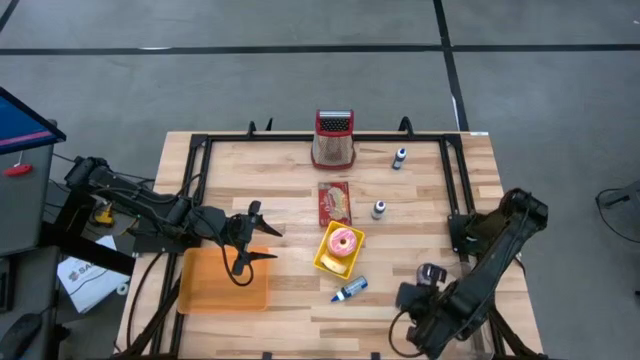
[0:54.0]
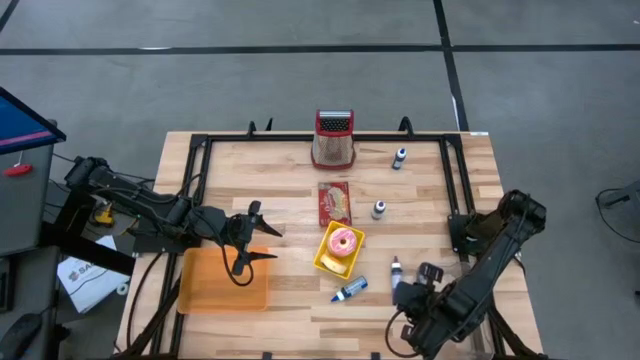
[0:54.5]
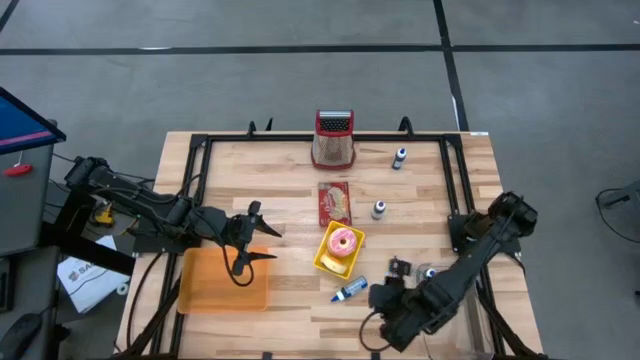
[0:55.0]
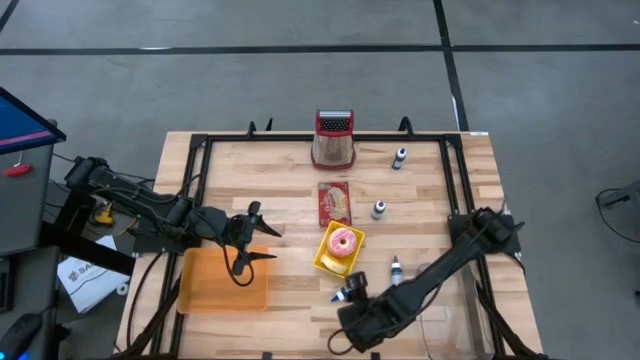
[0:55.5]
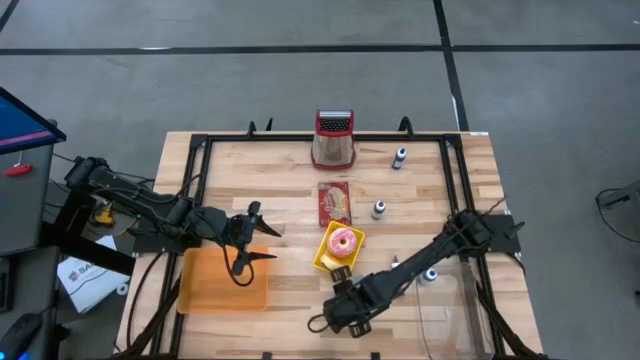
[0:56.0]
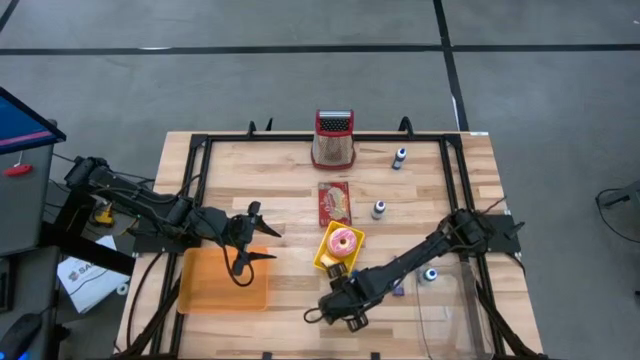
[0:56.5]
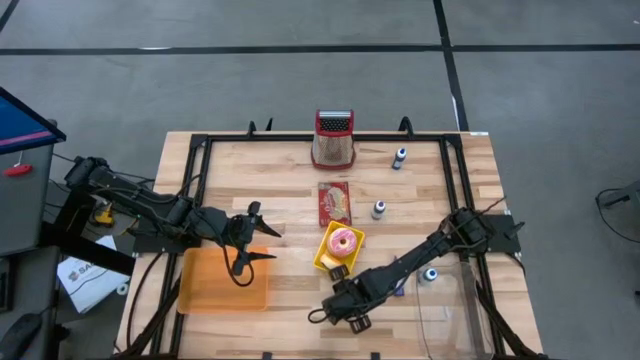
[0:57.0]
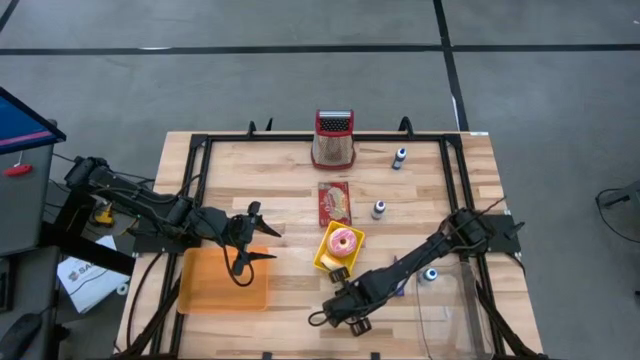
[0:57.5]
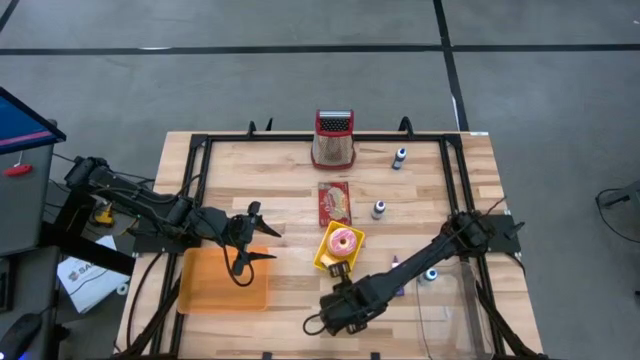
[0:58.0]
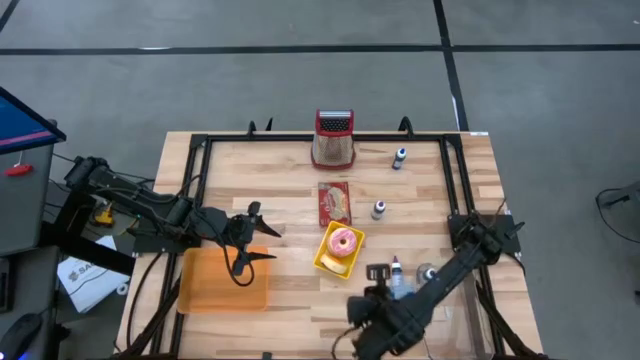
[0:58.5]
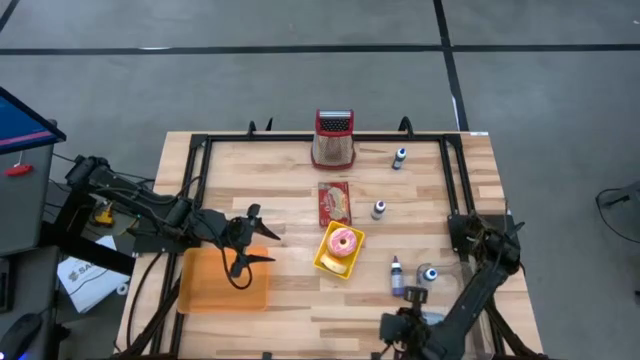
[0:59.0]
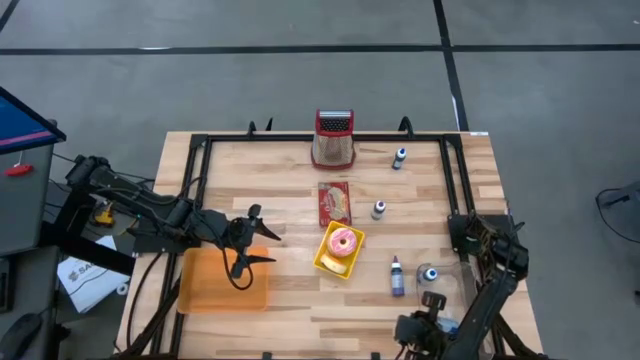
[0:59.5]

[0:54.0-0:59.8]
Put the bottom blue food coloring bottle into the transparent bin

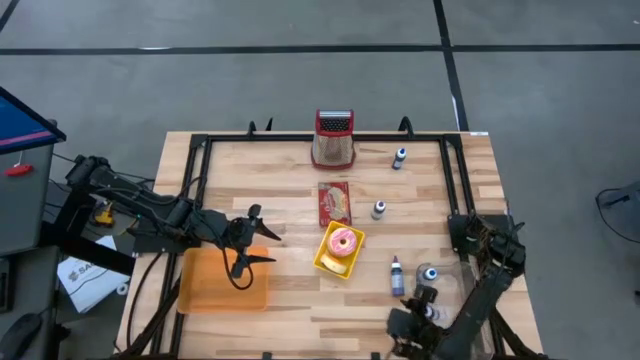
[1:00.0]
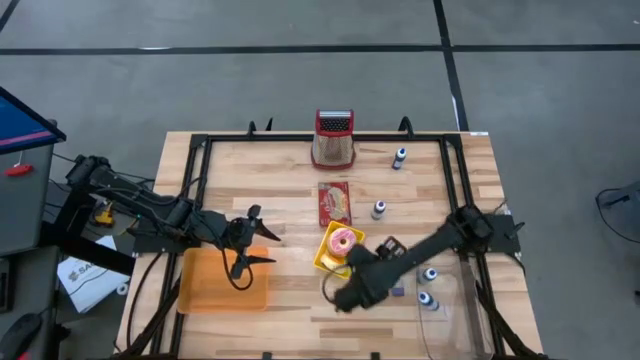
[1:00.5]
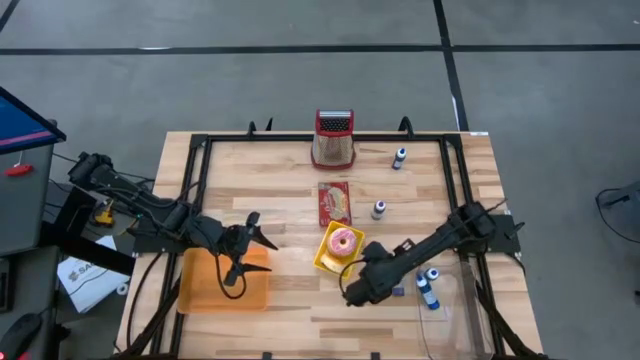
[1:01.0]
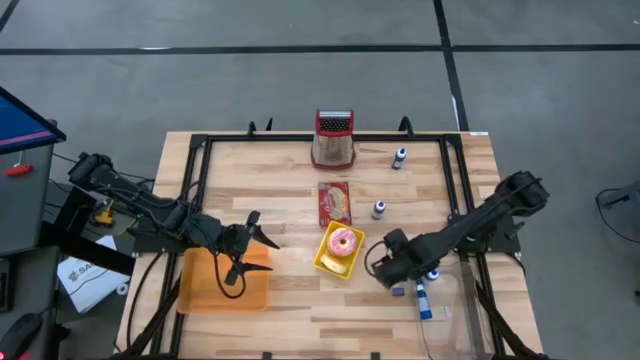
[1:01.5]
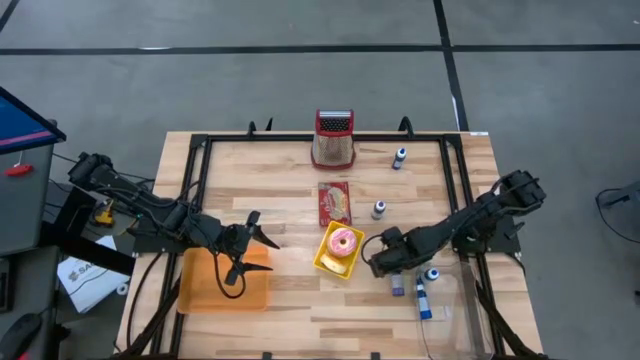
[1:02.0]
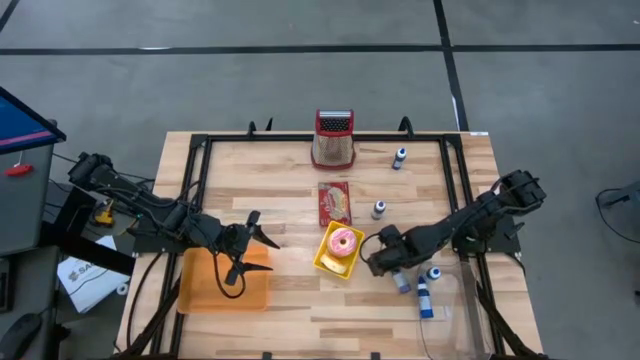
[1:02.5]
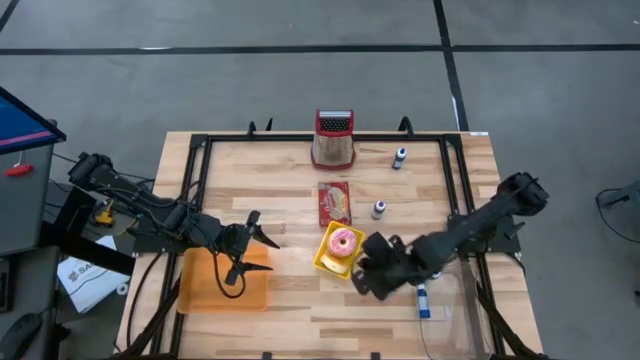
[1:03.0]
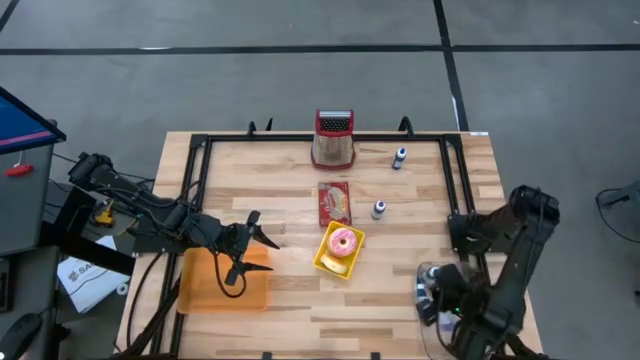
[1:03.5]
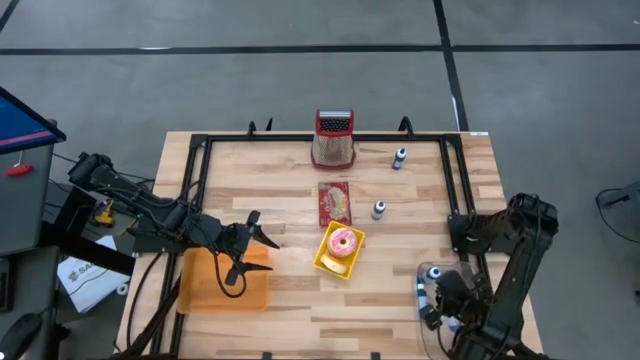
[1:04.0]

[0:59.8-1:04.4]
Put the bottom violet food coloring bottle into the transparent bin

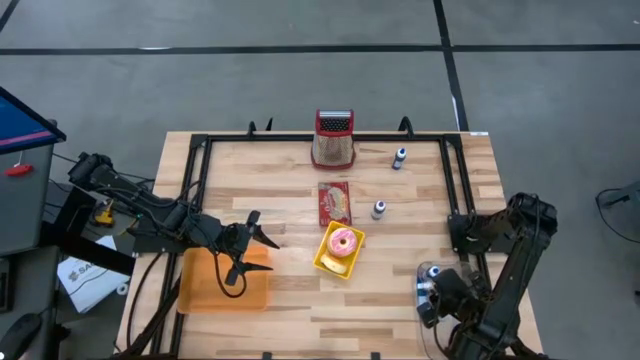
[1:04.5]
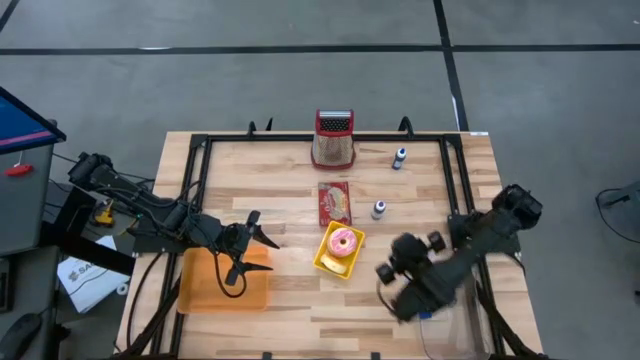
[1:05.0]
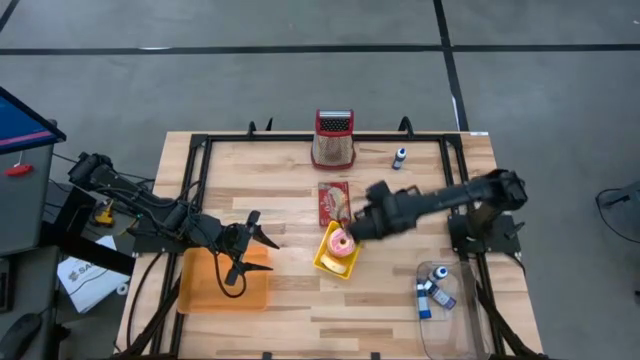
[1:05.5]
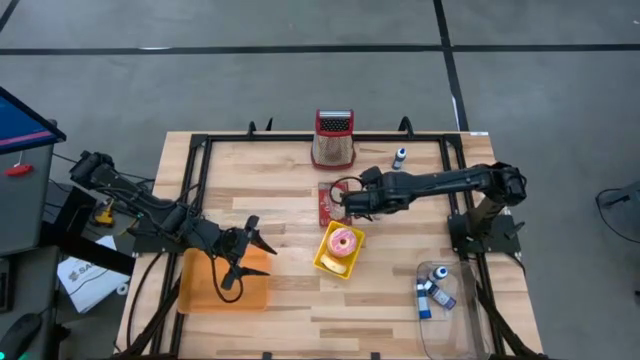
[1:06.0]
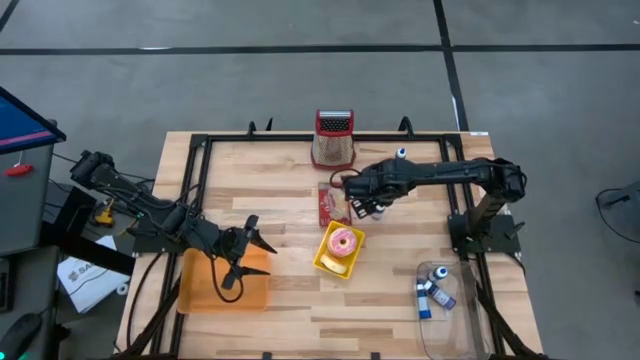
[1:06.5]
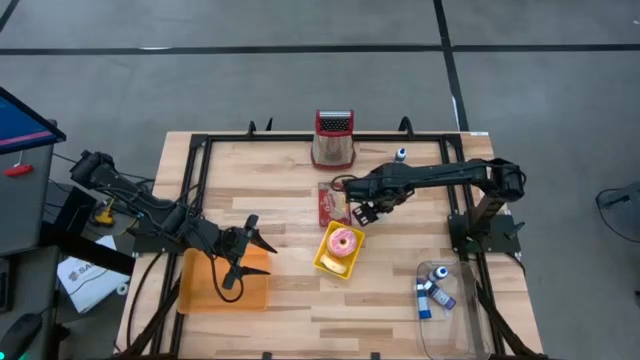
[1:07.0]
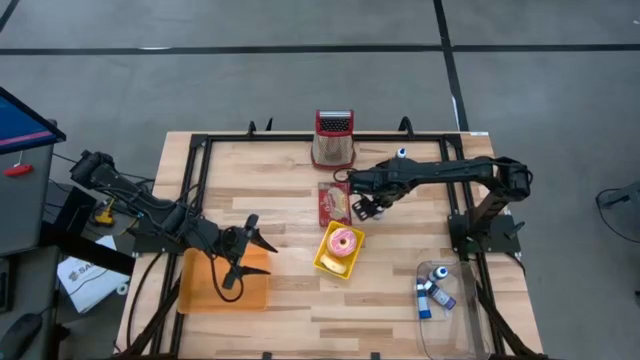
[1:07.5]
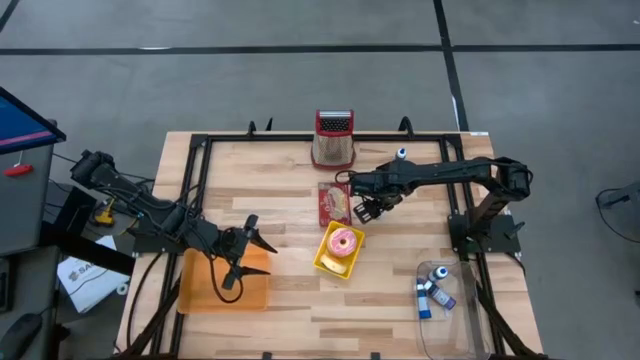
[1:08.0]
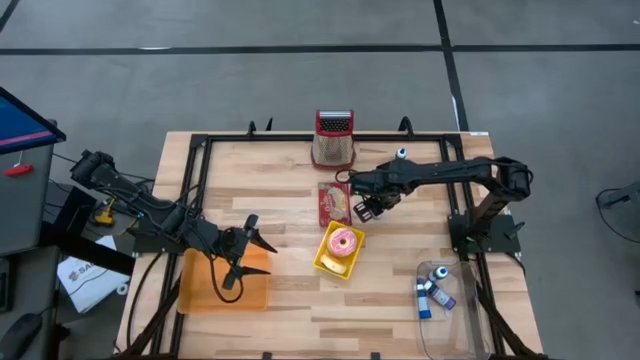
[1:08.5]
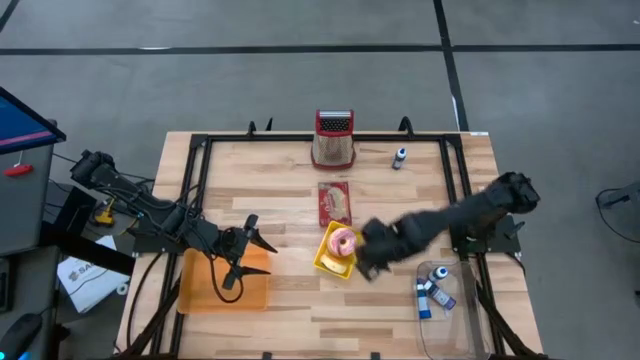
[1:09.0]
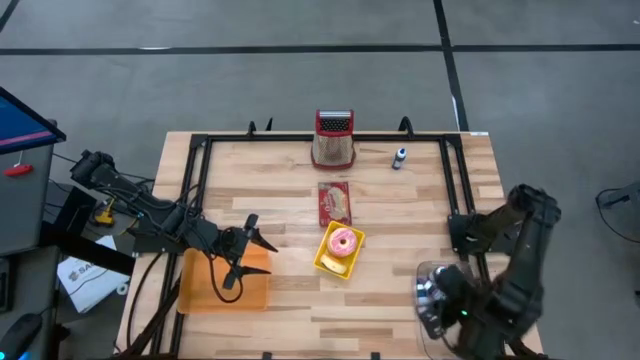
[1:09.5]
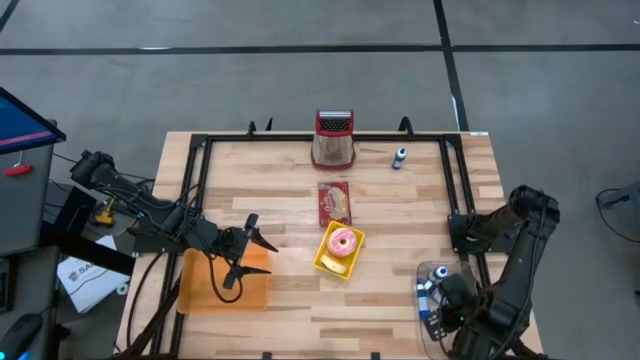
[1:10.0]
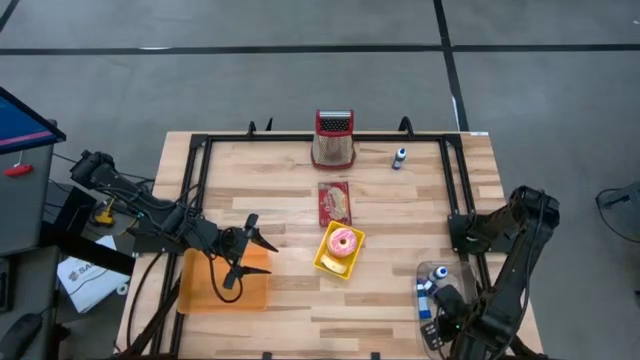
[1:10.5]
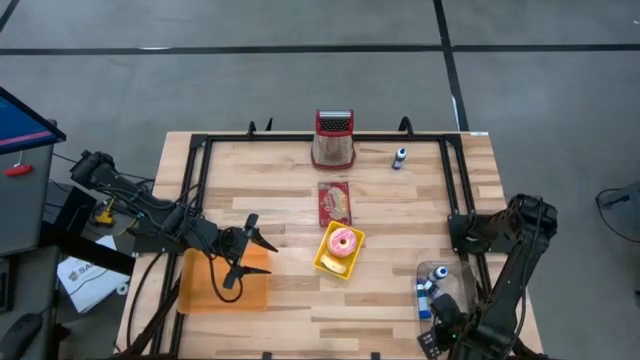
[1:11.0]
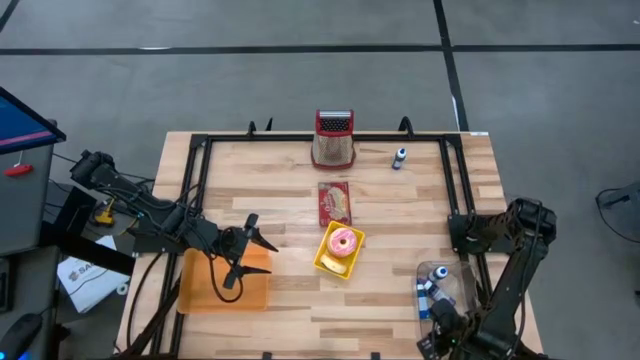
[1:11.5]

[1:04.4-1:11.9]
Put the violet food coloring bottle into the transparent bin

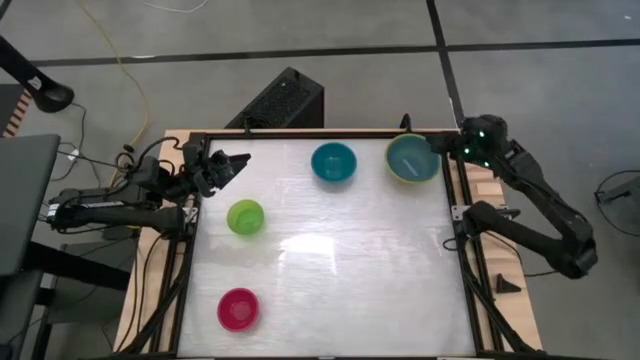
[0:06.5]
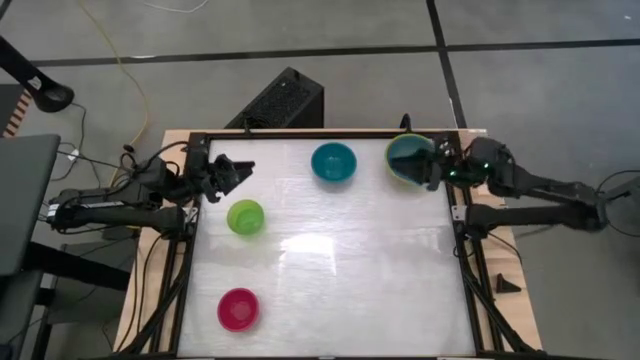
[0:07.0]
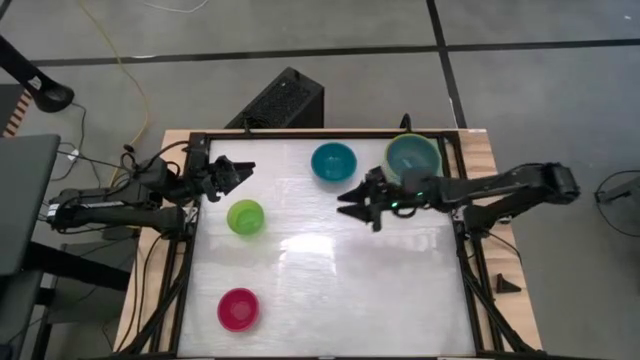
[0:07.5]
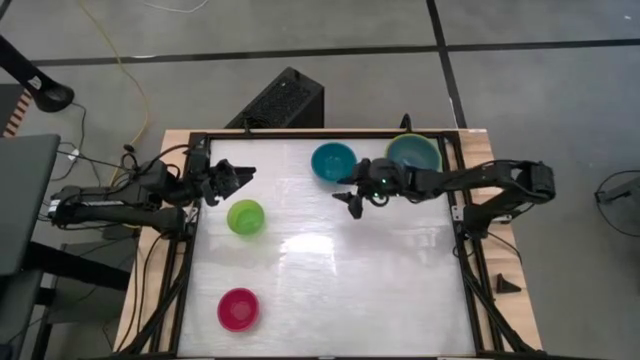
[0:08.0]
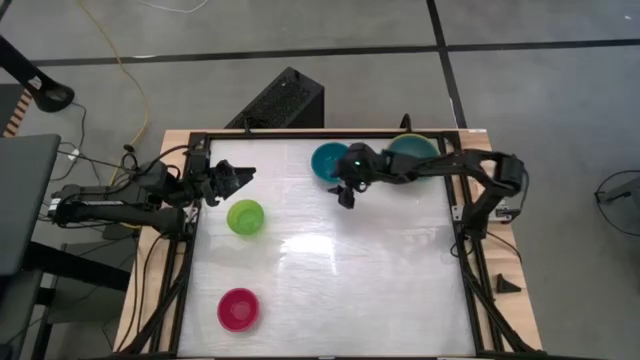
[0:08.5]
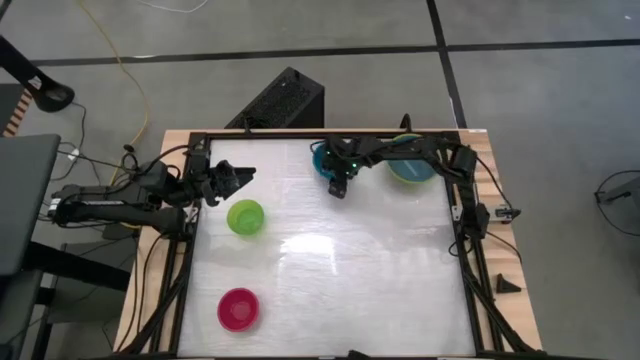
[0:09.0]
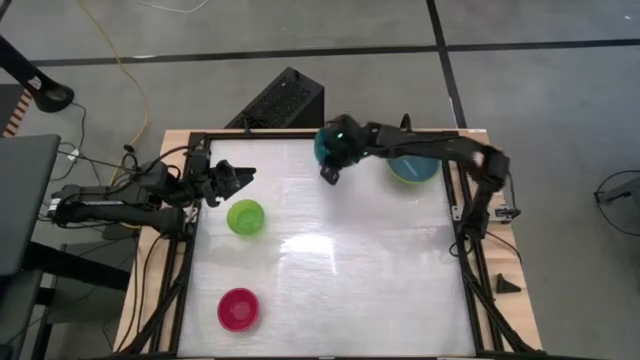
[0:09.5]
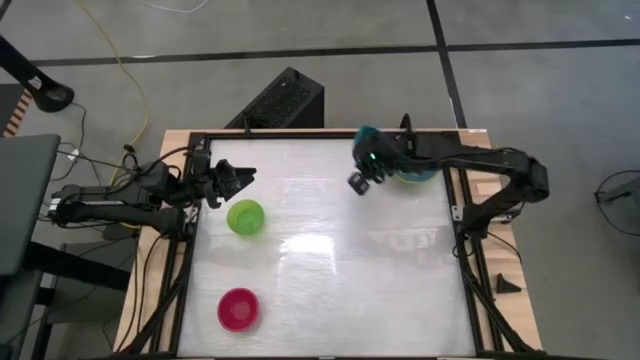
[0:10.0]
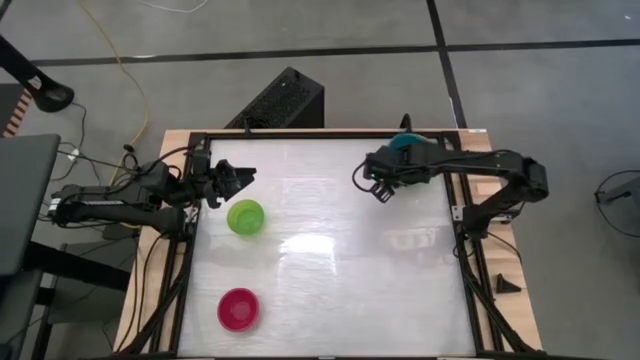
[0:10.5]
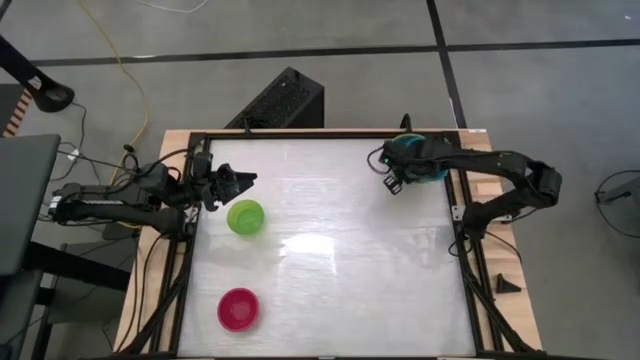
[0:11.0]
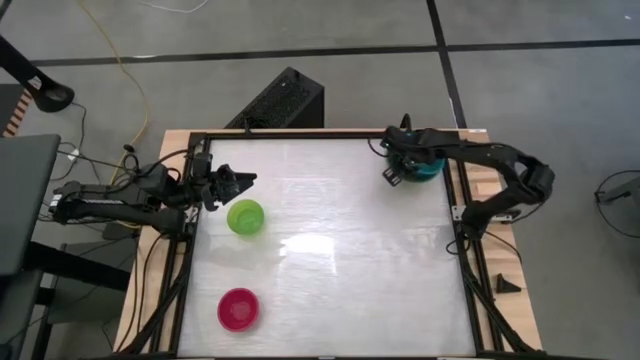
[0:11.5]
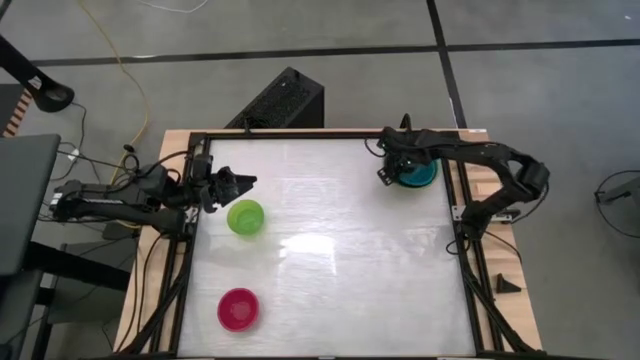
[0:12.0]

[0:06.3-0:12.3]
Stack the blue bowl on the light blue bowl
